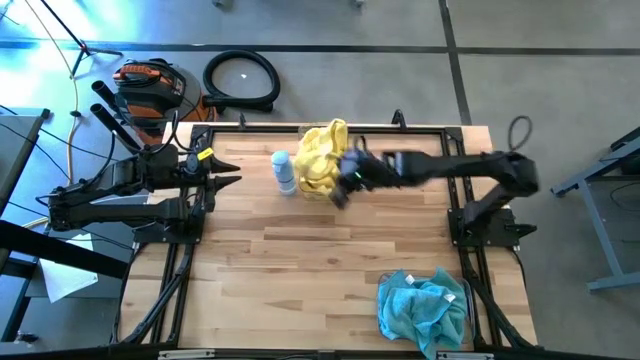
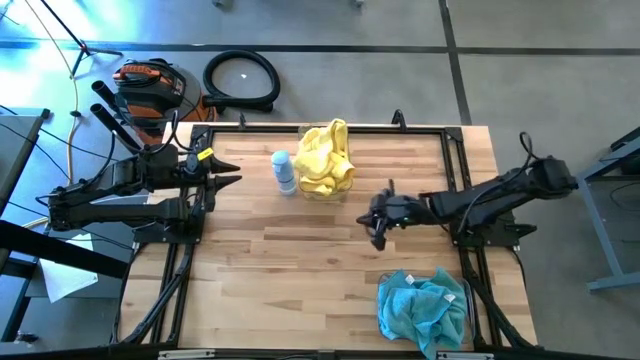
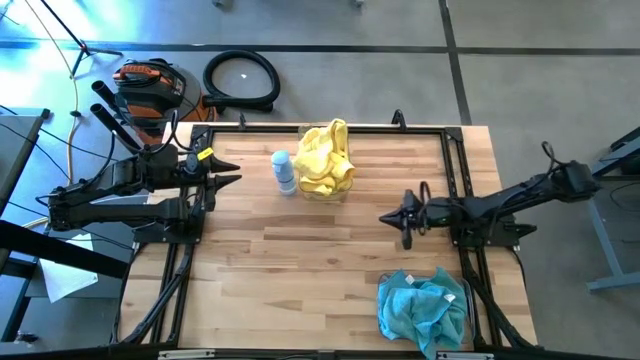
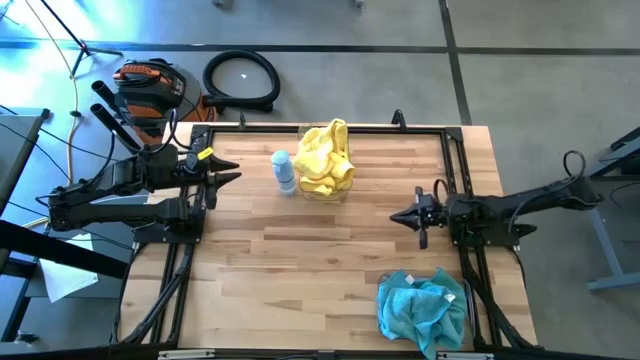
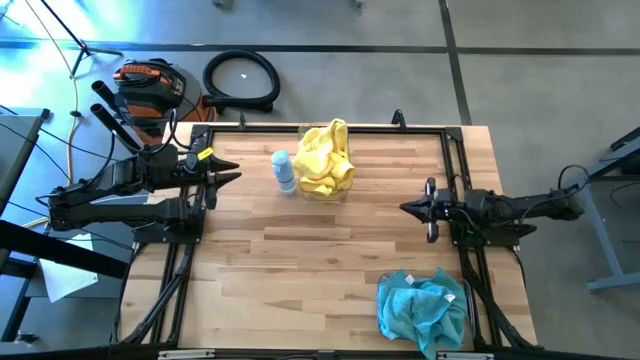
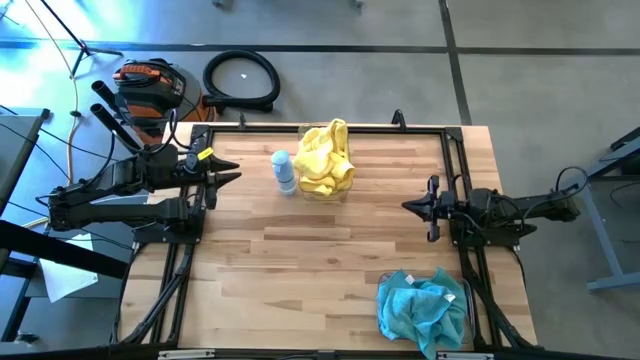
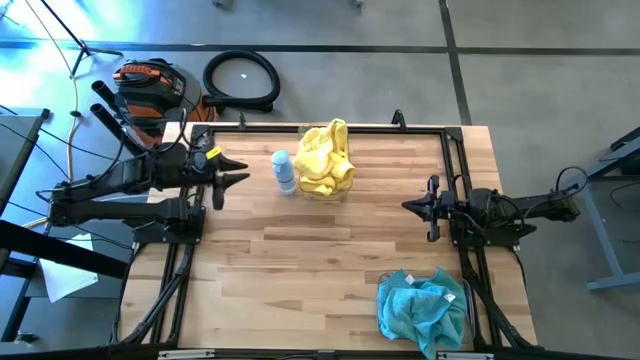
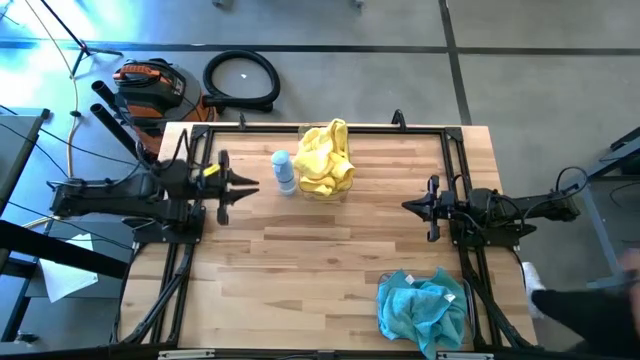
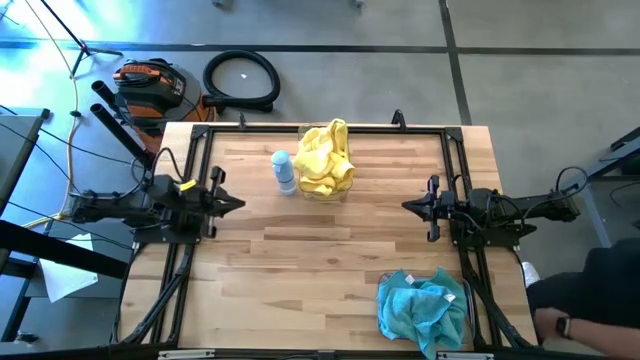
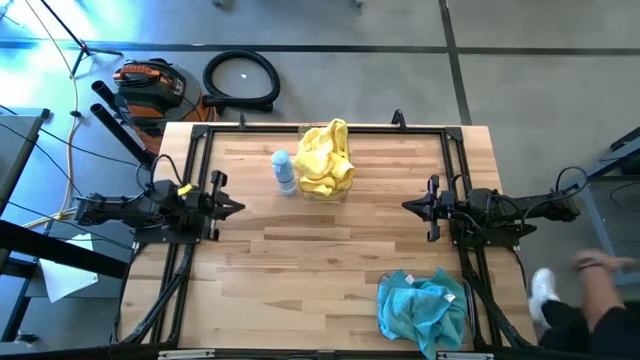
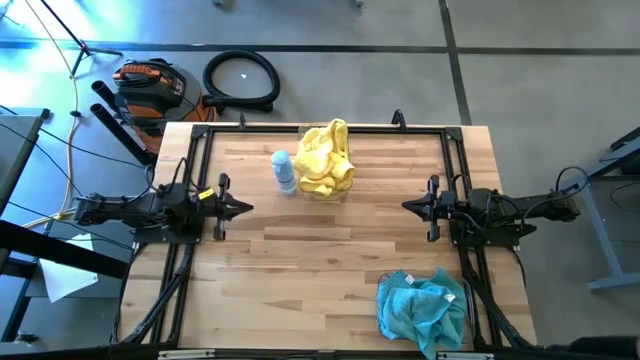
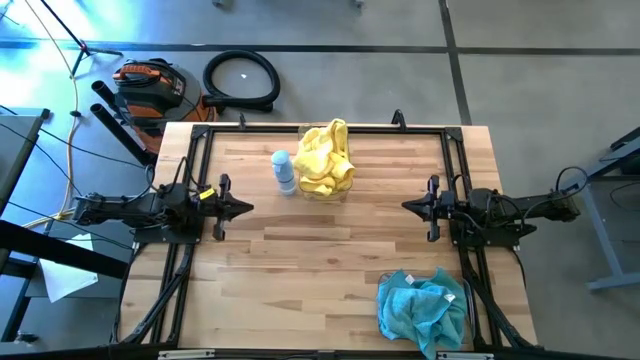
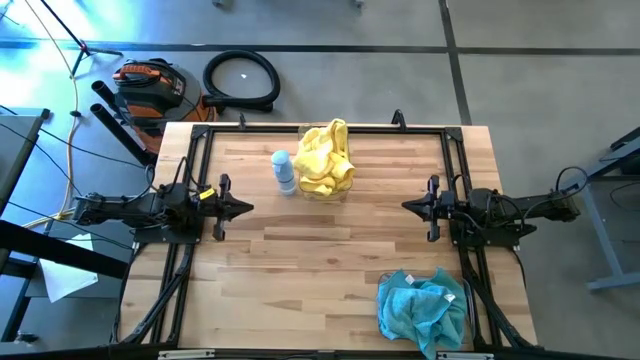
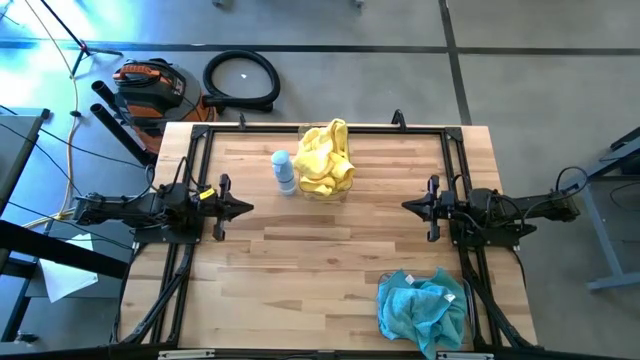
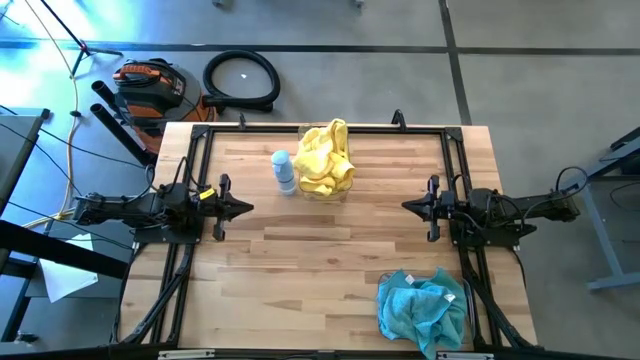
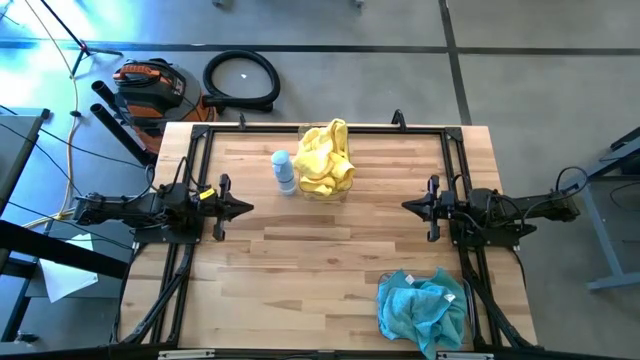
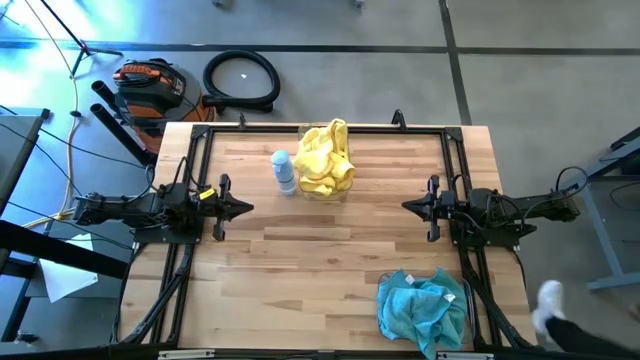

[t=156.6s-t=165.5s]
Task: Sort microfiber towel by color & place in baskets
Return to Home Position

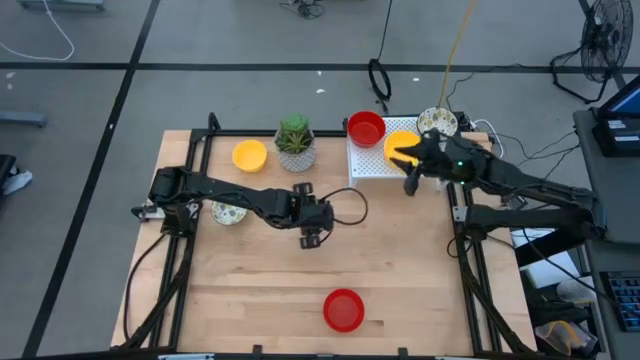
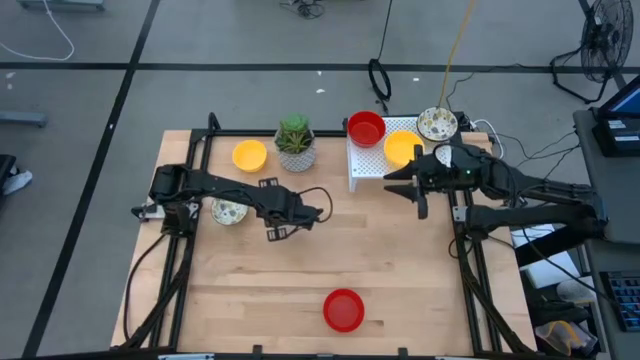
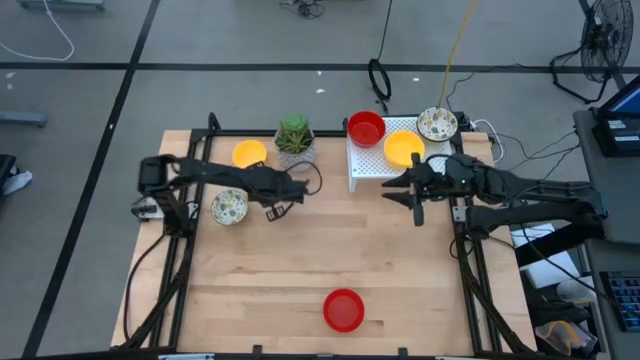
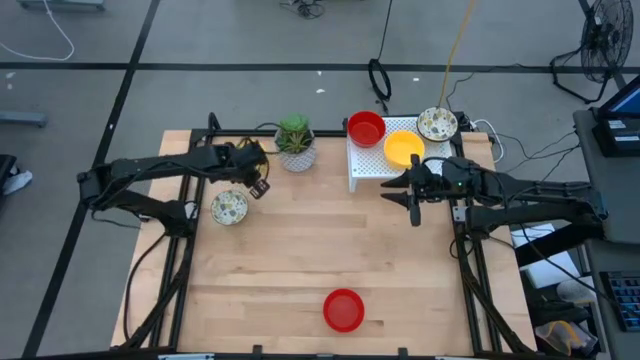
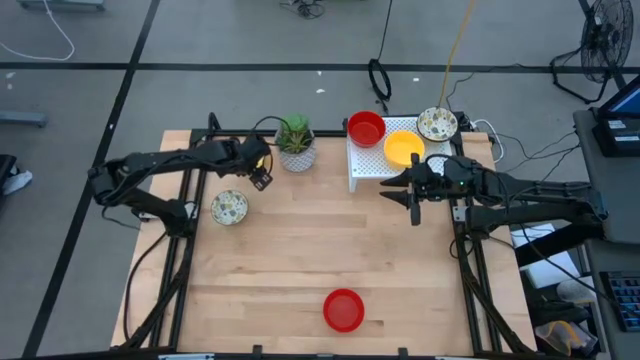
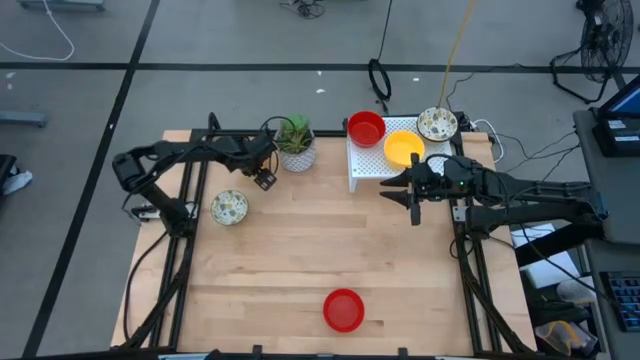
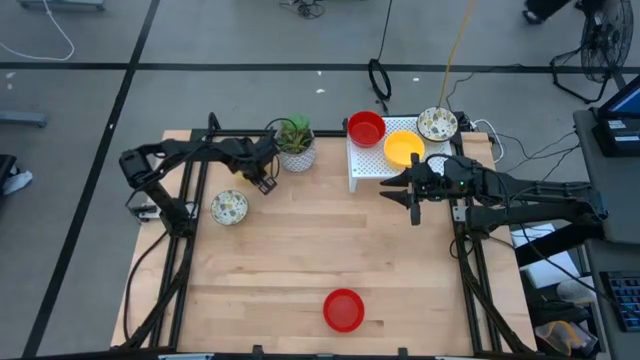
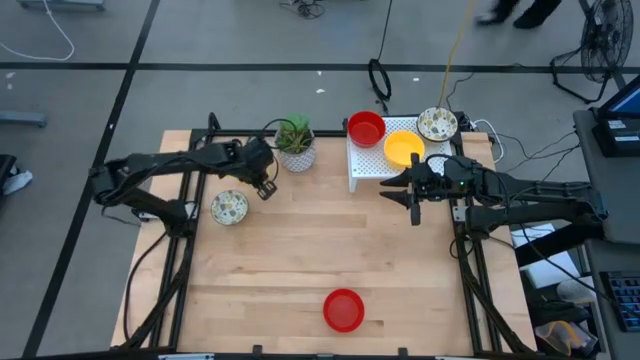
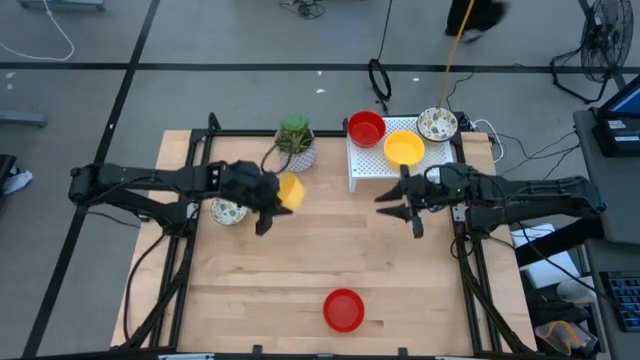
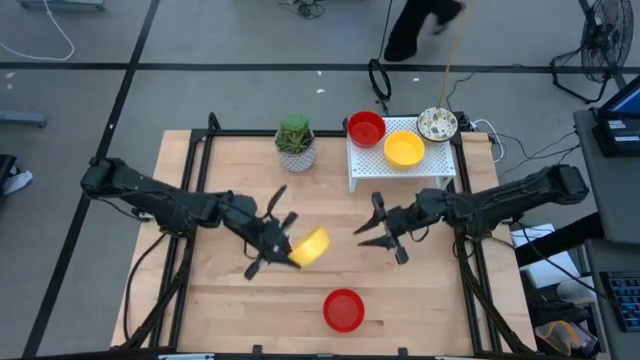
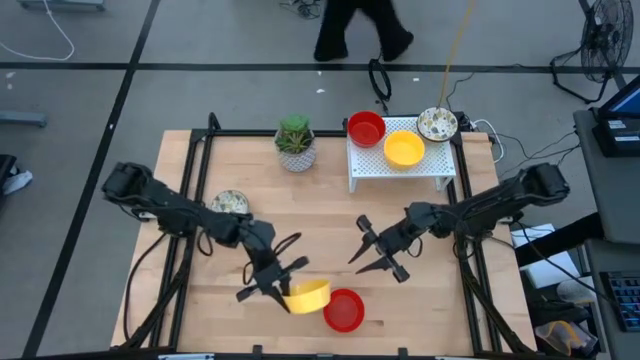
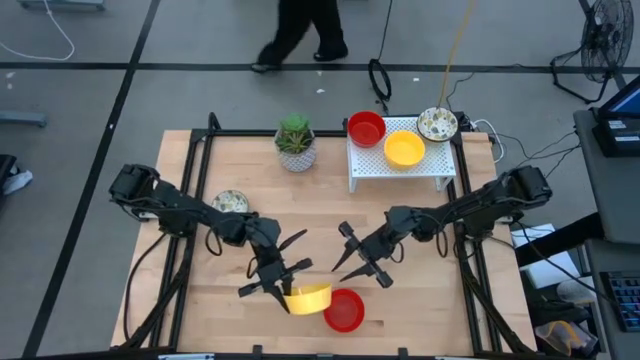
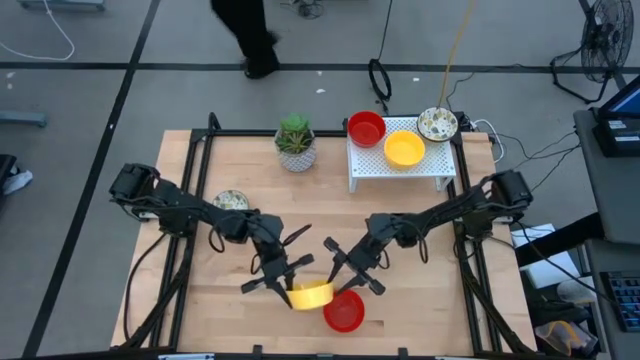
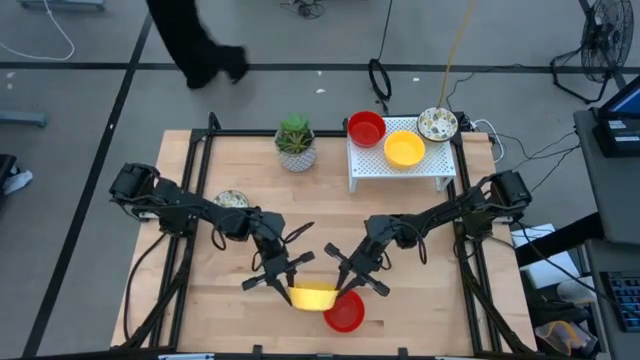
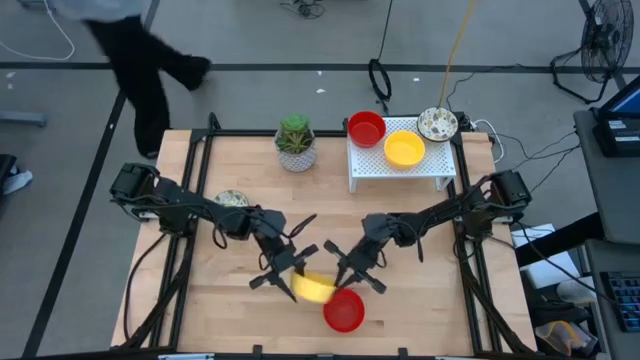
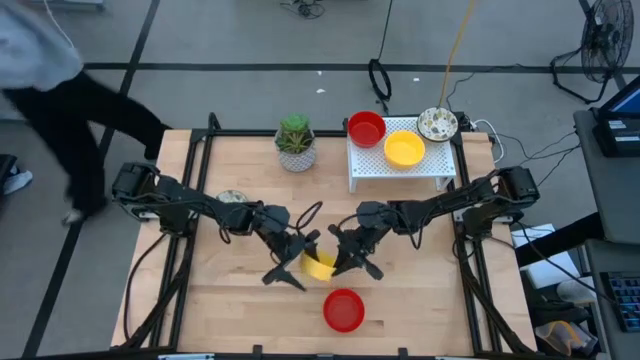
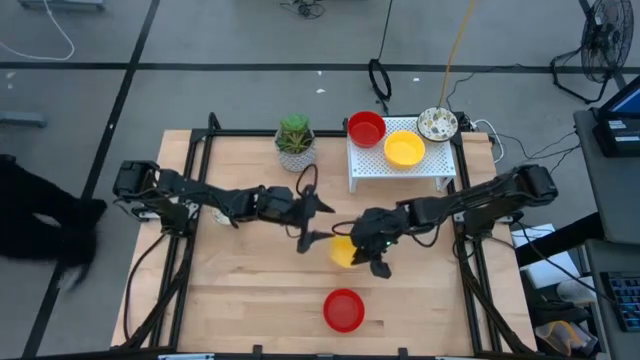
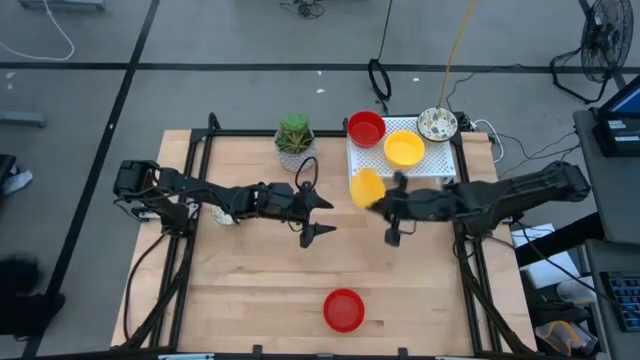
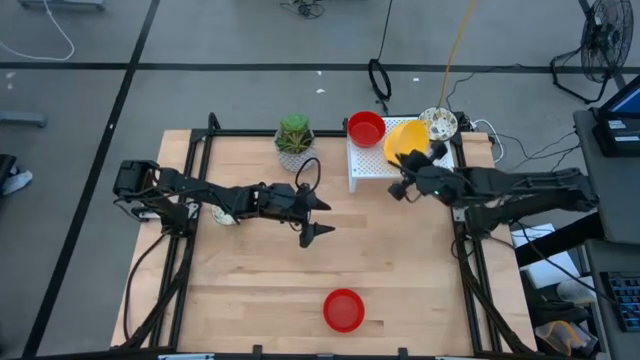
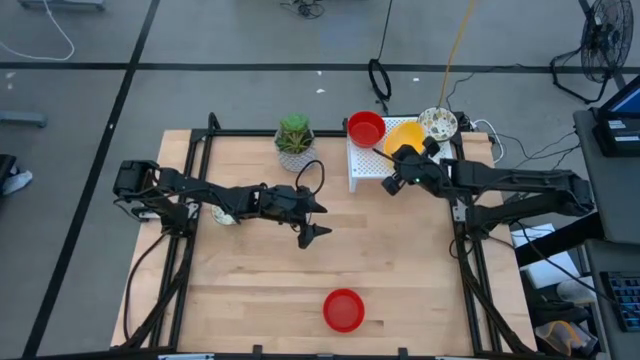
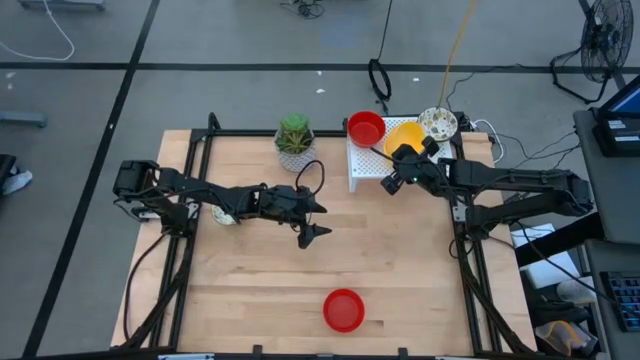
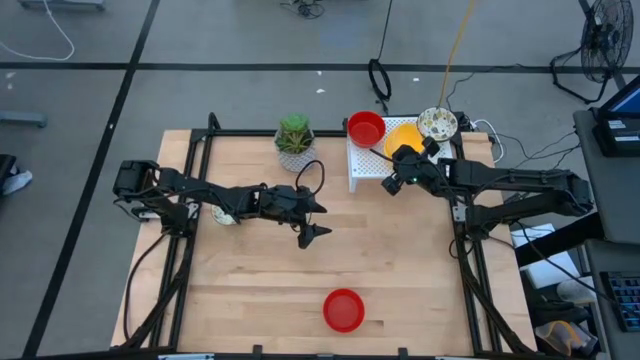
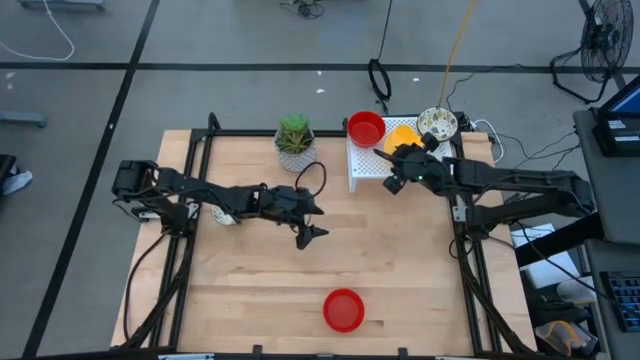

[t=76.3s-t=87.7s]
Task: Pick & Place Mini bowls
Stack the yellow bowl on top of the other yellow bowls on the shelf
